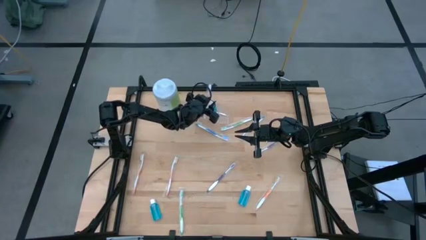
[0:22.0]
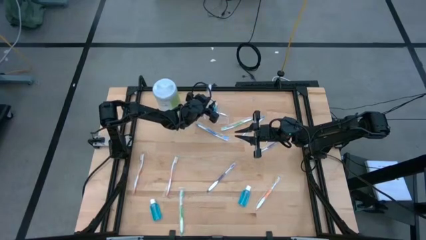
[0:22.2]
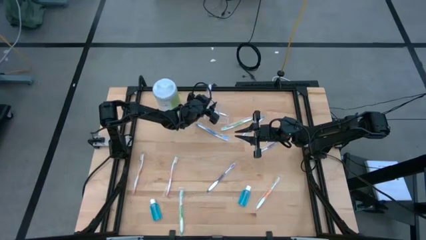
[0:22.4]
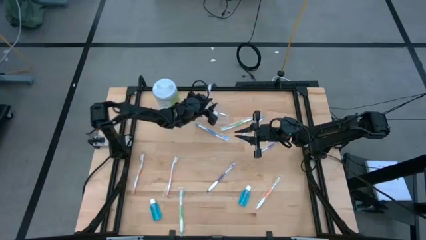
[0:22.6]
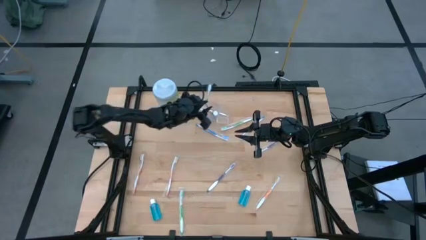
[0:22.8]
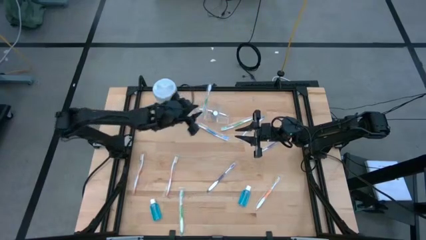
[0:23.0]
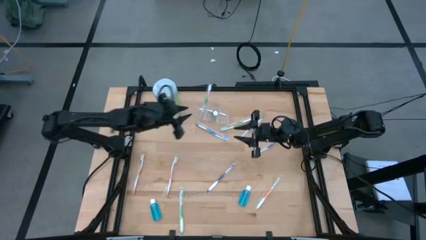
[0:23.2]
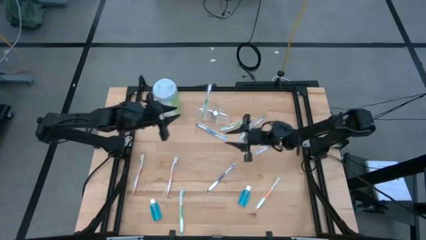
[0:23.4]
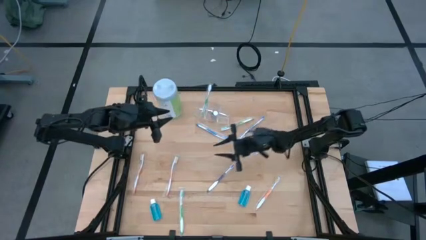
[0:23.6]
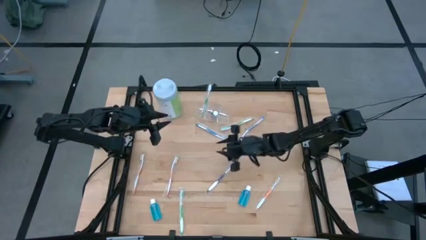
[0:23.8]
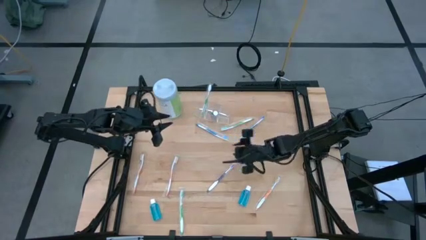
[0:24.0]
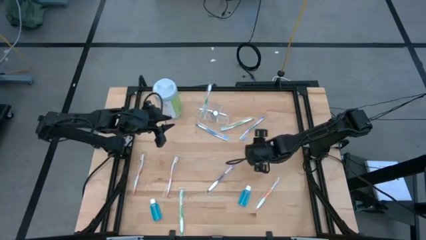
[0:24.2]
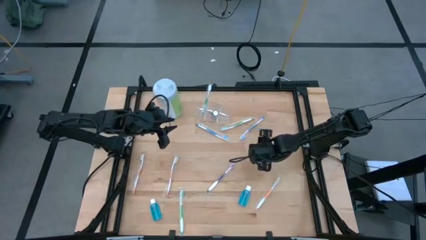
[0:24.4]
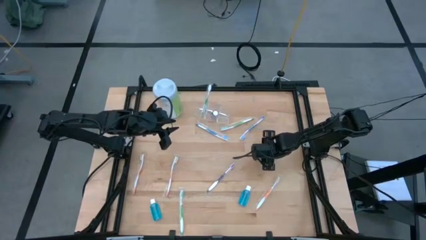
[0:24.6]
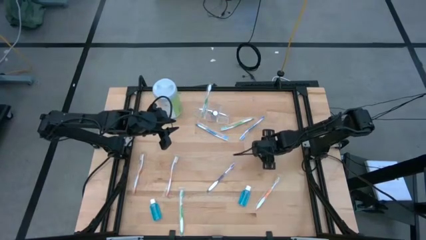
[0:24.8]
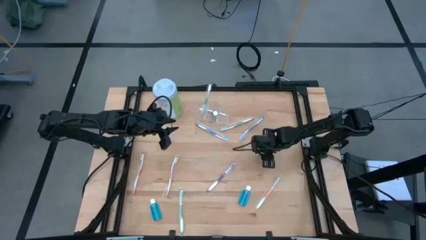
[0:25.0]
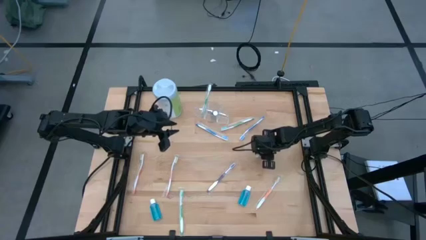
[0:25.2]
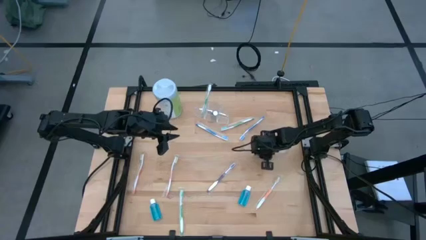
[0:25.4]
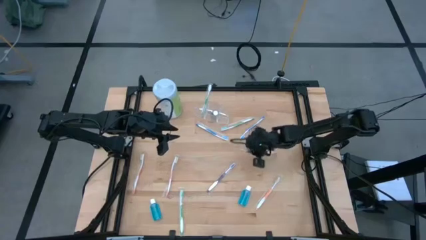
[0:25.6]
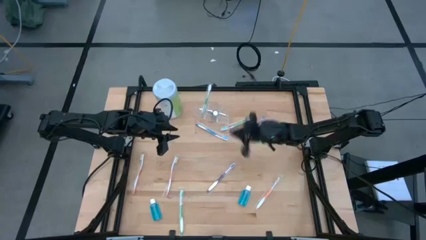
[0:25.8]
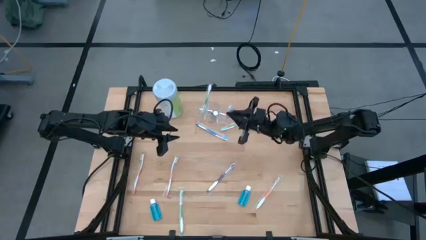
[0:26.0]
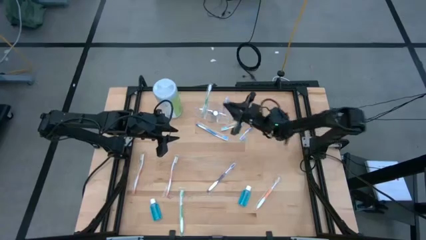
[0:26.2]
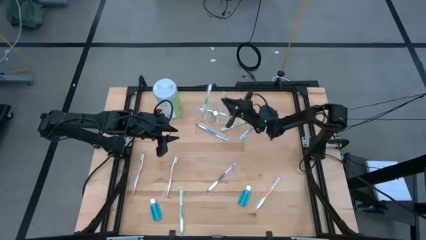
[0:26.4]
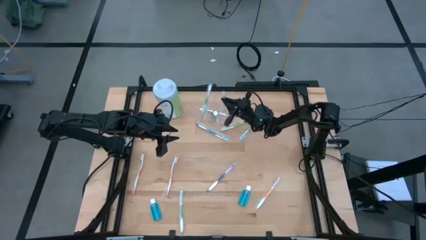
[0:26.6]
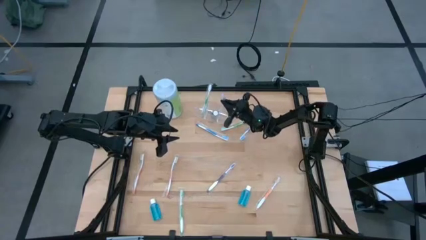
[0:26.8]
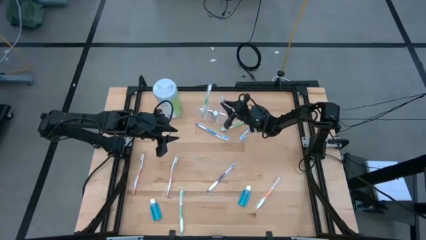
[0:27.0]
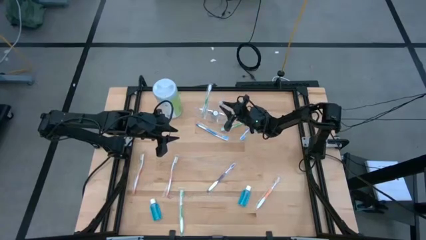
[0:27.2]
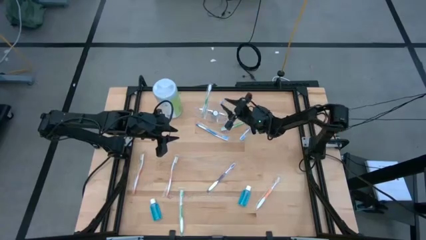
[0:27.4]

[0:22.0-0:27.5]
Task: Pick & Place toothbrushing station
Put the right purple toothbrush into the transparent organizer

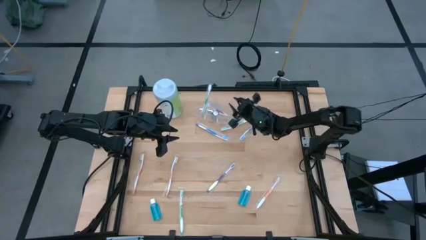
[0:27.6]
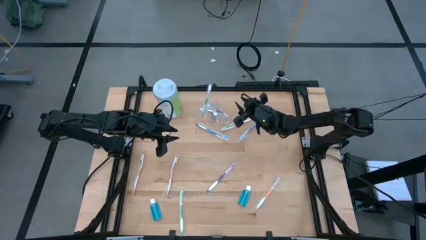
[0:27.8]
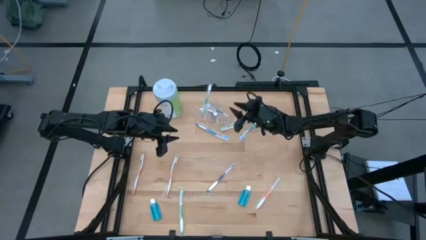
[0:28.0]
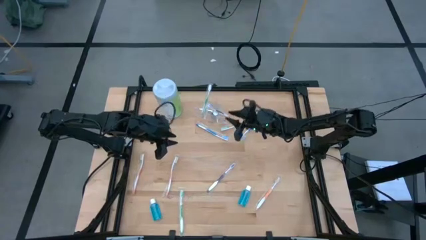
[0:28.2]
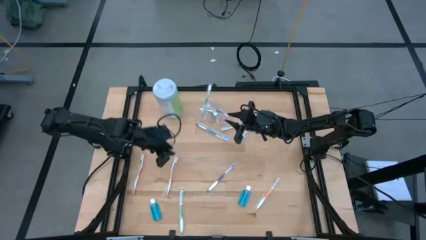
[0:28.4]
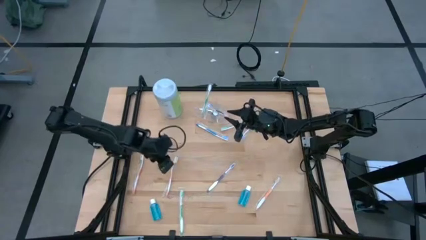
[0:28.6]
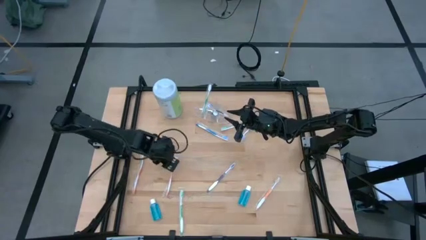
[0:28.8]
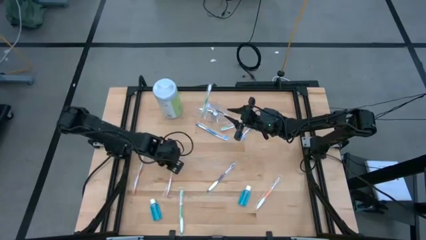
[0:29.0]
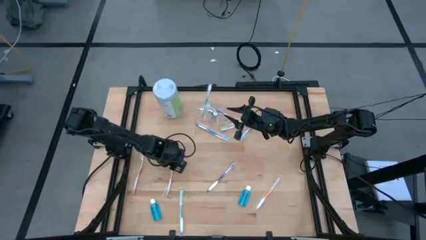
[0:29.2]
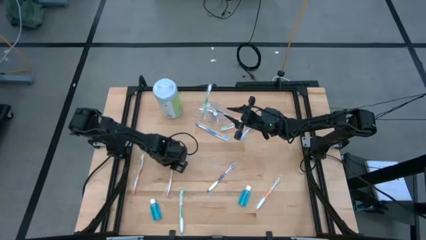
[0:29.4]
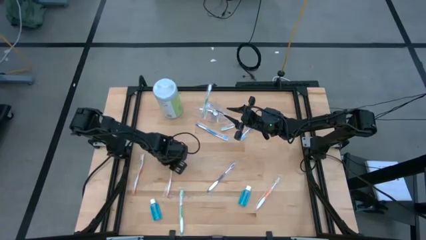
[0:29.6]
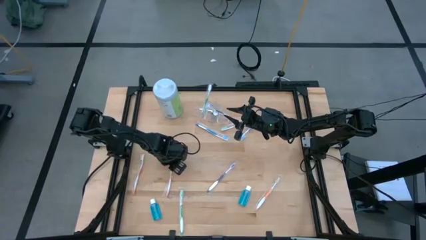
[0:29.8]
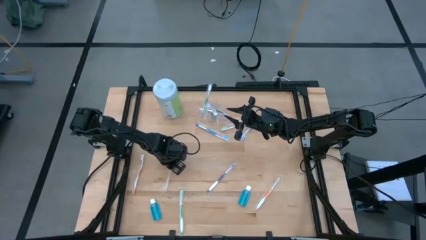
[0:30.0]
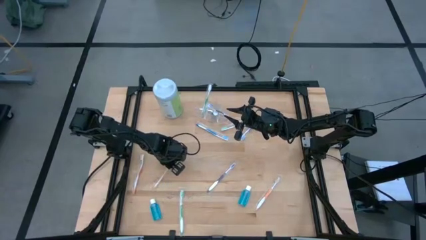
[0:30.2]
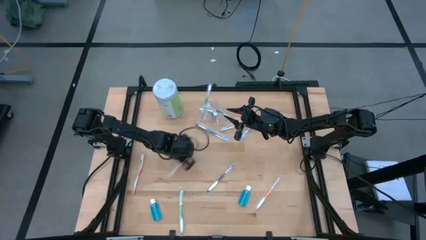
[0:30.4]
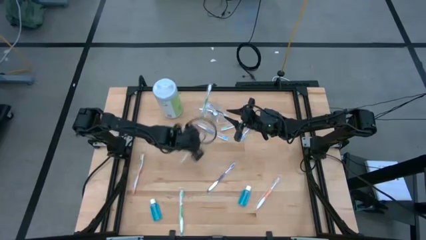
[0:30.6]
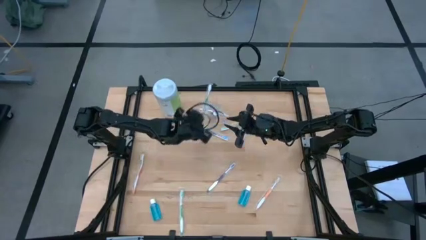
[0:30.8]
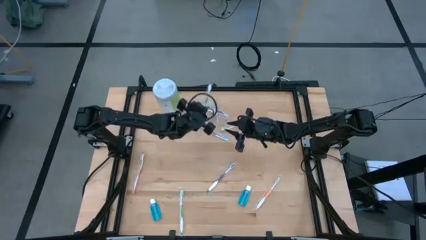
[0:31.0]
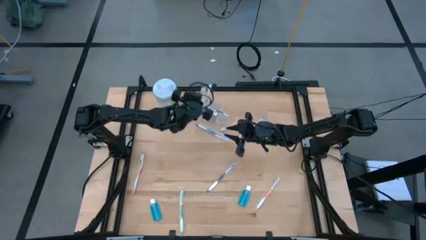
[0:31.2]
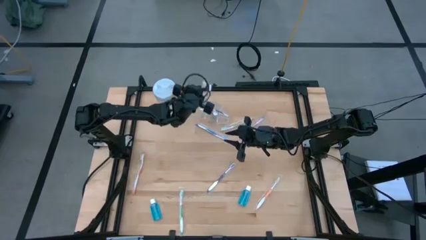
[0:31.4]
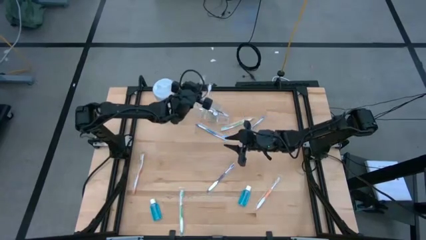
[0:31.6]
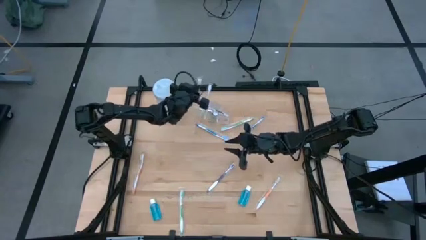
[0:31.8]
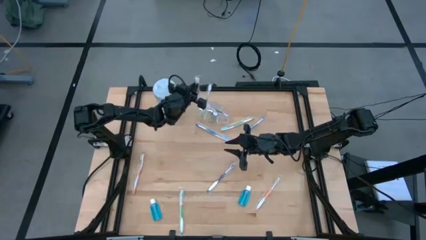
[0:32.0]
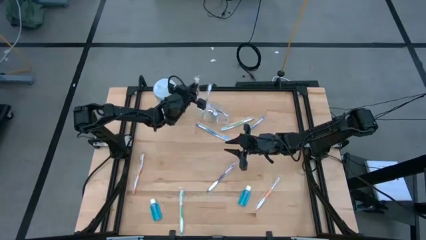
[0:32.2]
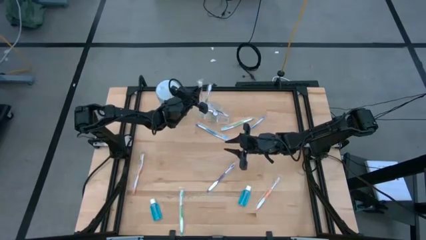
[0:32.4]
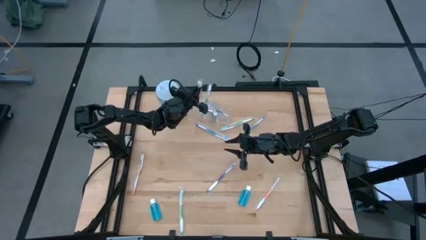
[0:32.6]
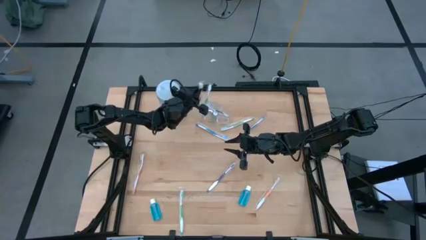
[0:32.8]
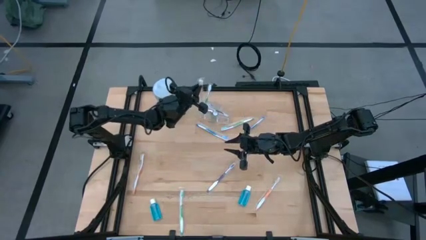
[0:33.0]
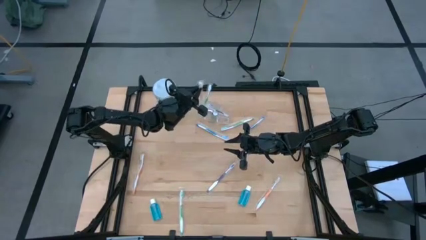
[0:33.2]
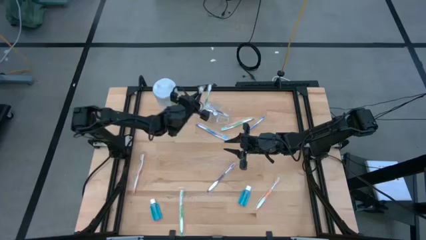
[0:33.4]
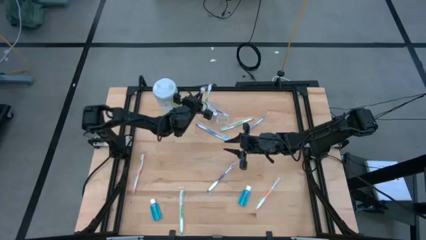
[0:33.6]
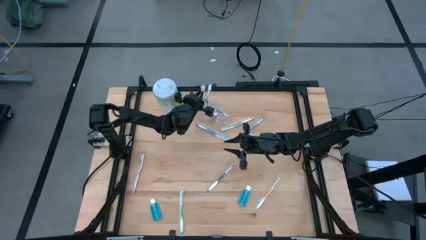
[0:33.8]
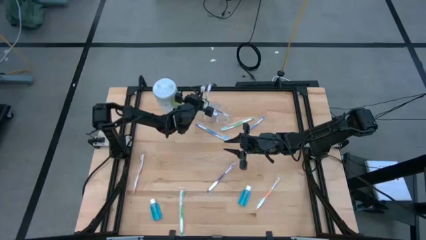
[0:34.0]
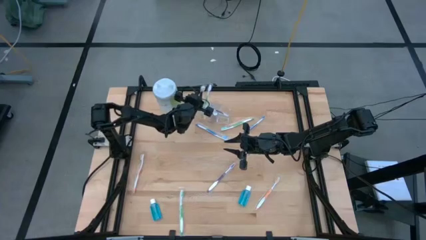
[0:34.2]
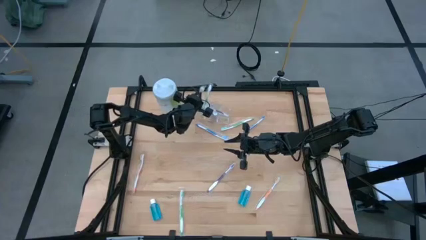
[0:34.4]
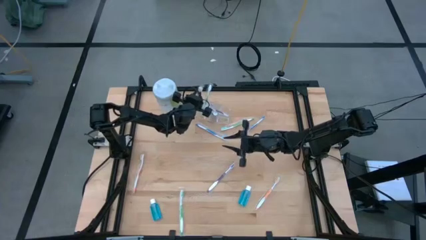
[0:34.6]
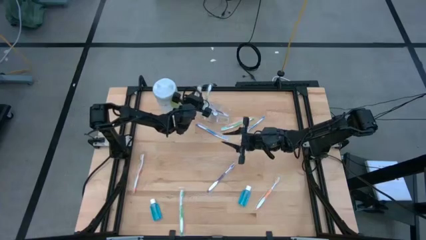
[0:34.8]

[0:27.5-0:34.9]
Put the middle orange toothbrush into the transparent organizer

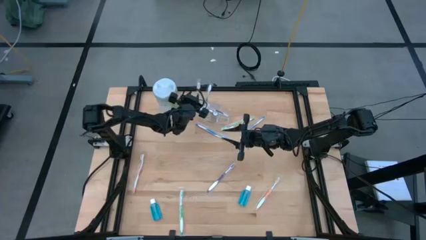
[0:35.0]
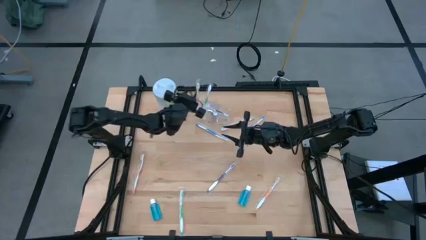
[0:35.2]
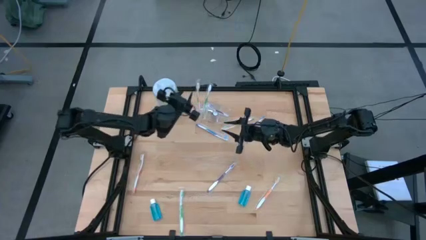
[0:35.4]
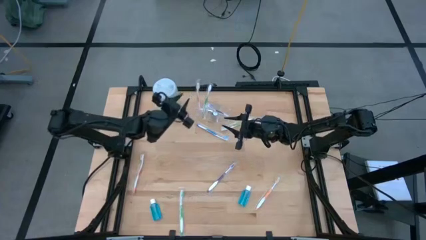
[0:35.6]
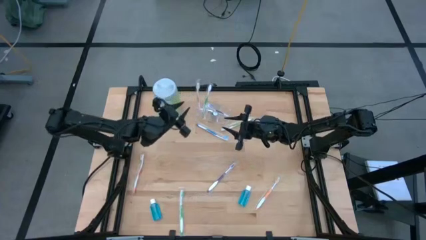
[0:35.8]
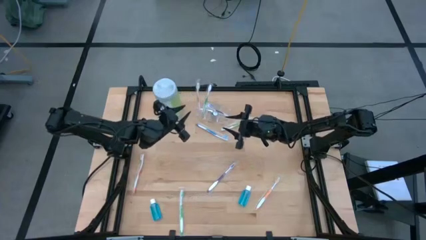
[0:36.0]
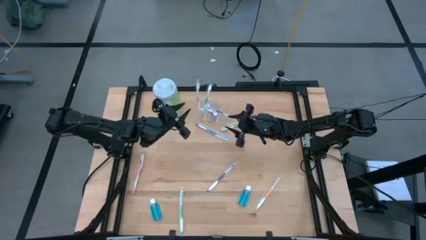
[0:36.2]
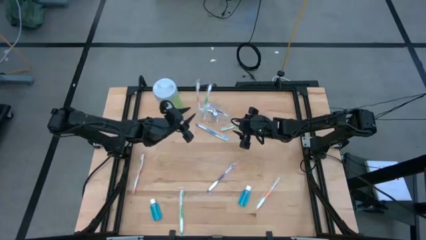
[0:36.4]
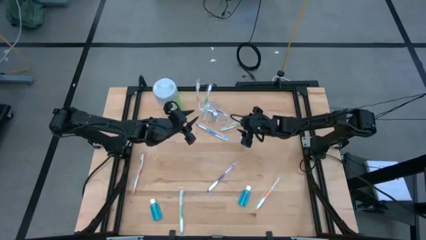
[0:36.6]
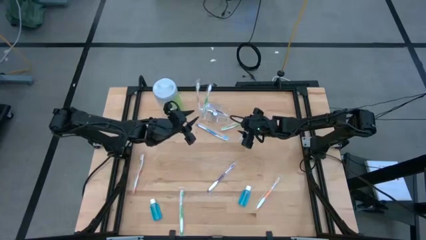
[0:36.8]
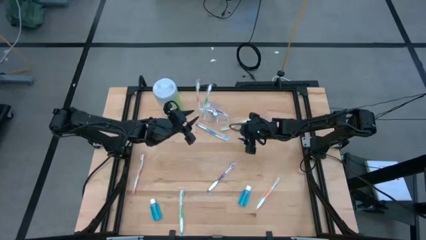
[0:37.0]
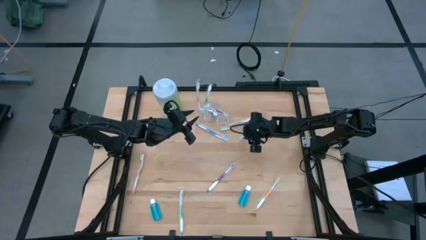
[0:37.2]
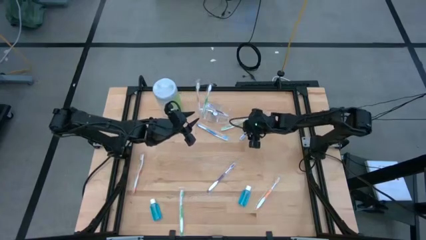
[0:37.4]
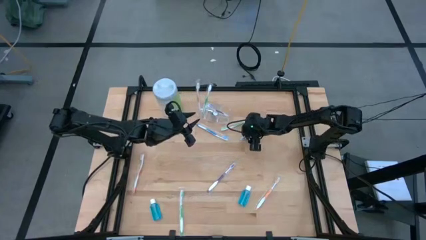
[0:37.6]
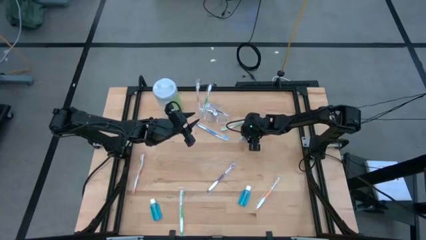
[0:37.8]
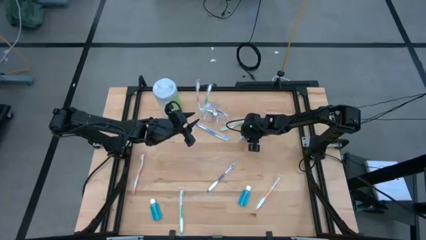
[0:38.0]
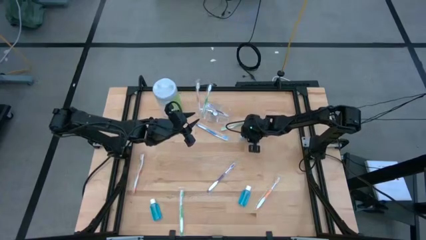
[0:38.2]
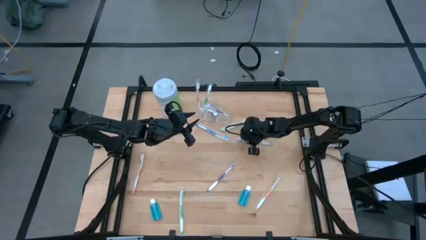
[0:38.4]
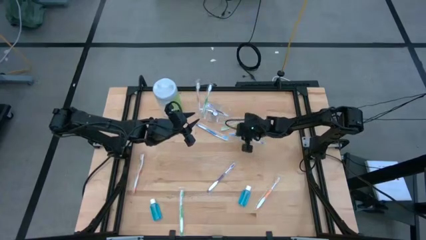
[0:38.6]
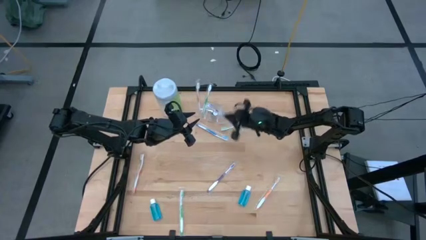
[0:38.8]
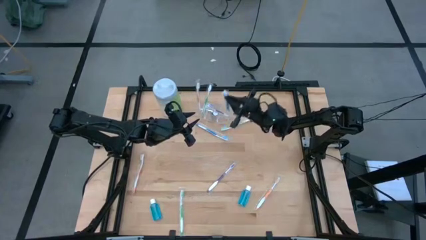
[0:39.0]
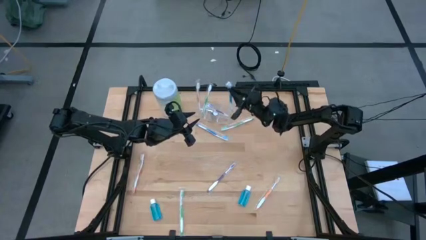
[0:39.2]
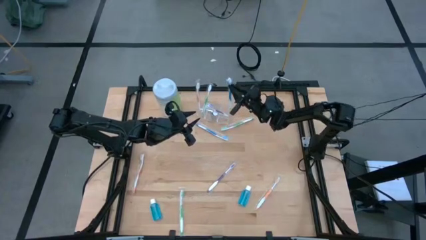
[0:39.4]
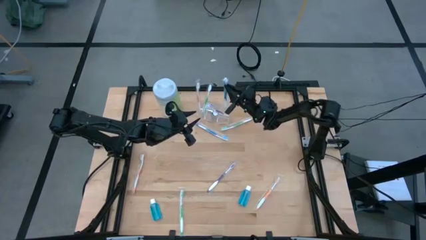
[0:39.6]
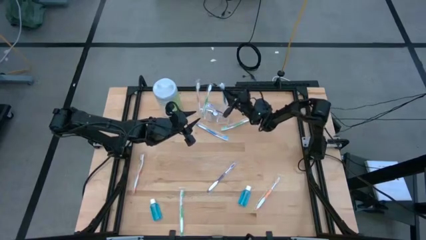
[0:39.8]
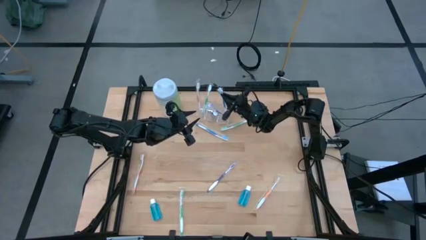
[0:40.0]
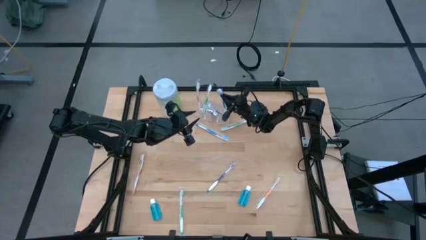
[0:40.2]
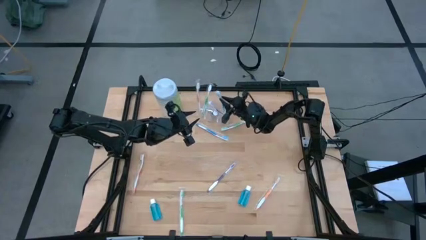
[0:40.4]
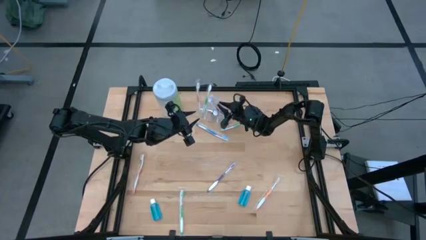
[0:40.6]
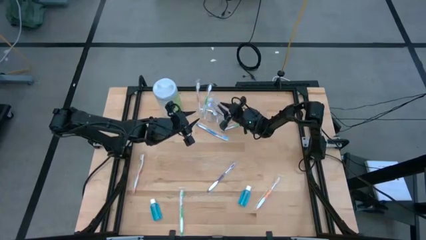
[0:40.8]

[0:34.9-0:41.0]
Put the right blue toothbrush into the transparent organizer
